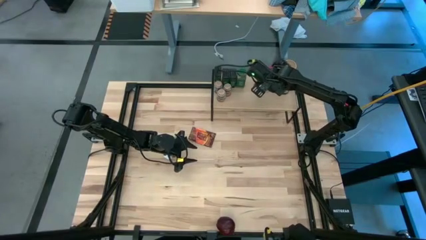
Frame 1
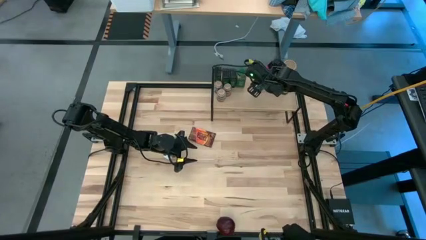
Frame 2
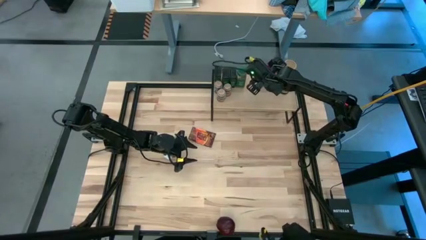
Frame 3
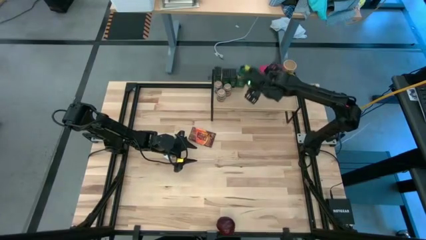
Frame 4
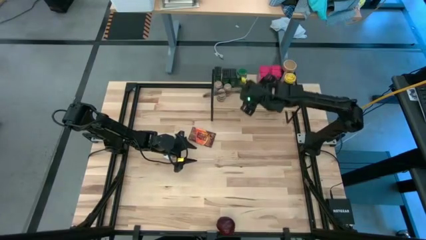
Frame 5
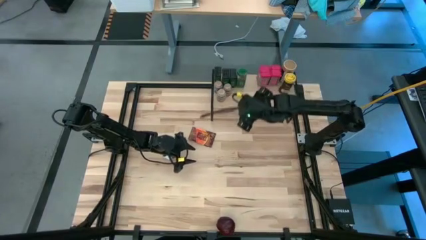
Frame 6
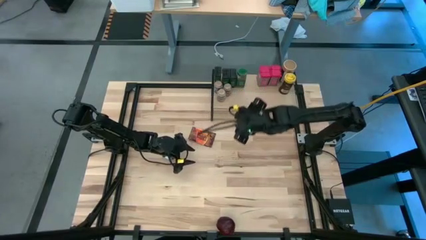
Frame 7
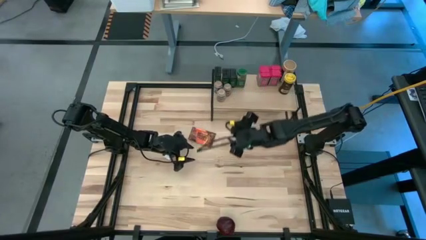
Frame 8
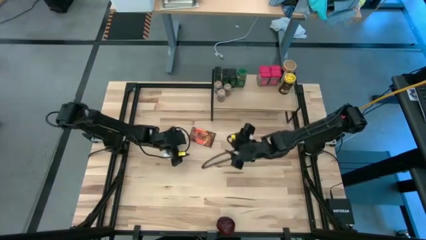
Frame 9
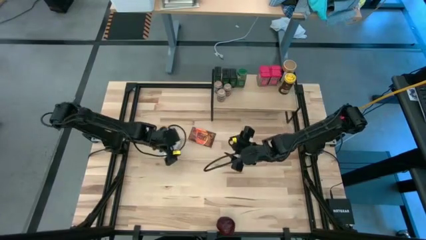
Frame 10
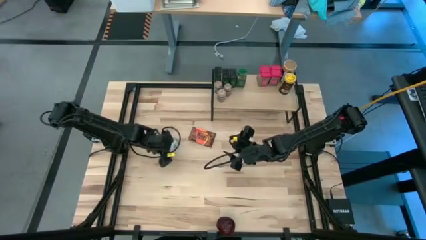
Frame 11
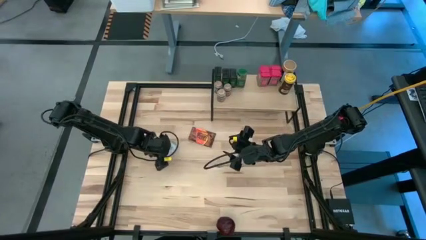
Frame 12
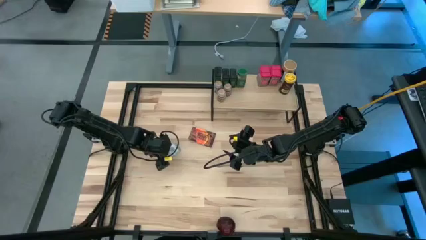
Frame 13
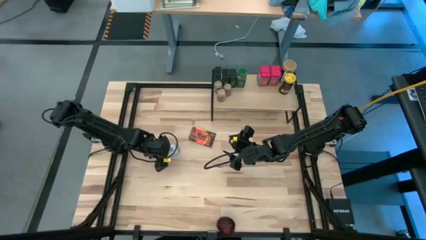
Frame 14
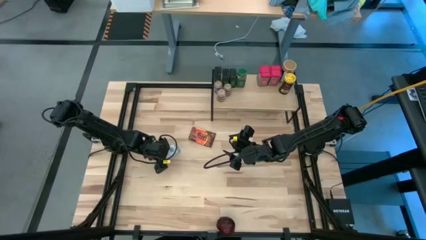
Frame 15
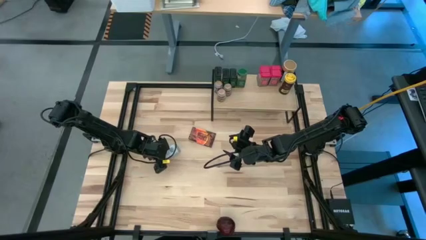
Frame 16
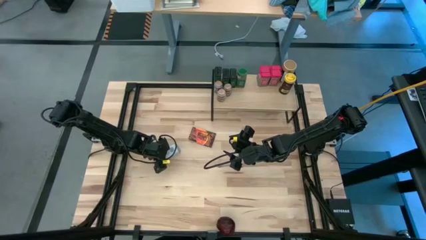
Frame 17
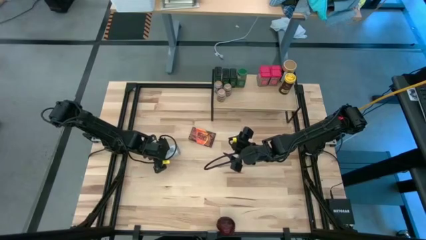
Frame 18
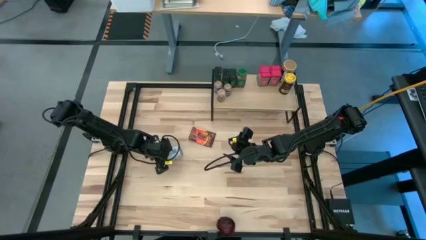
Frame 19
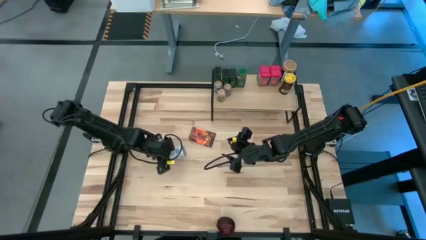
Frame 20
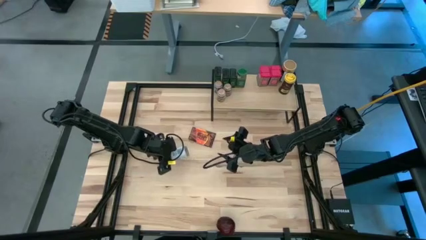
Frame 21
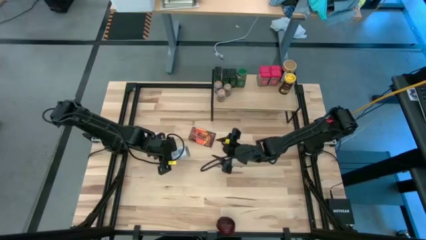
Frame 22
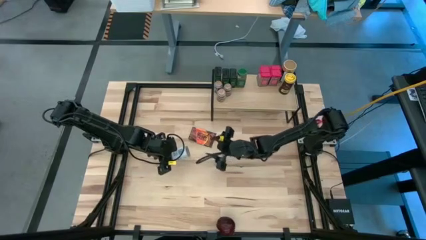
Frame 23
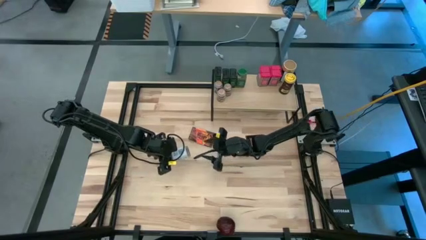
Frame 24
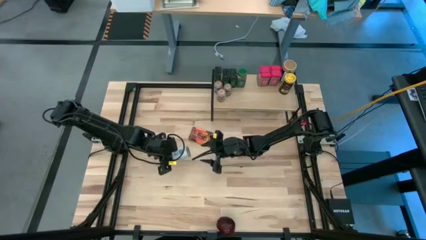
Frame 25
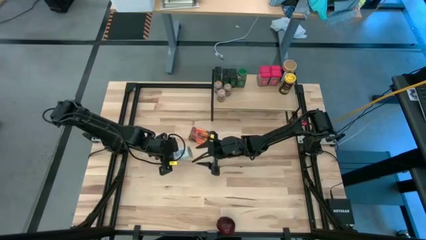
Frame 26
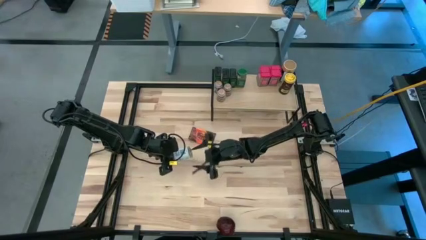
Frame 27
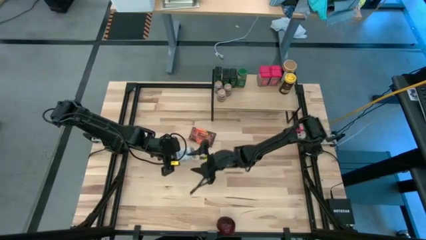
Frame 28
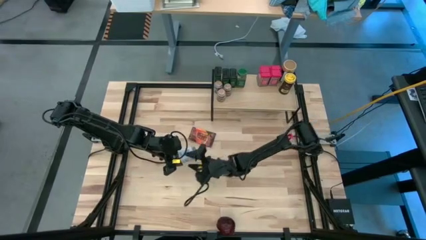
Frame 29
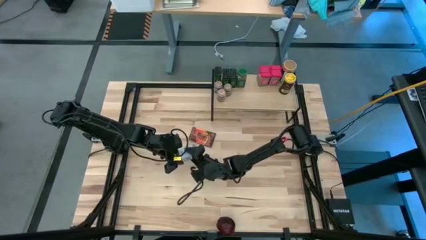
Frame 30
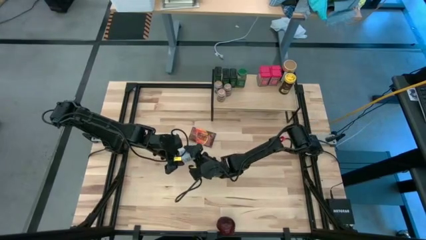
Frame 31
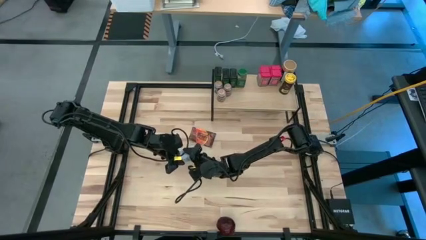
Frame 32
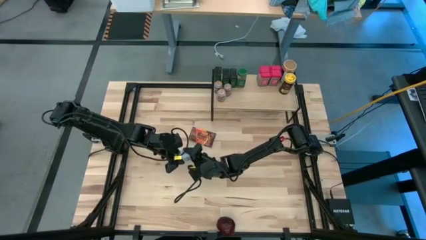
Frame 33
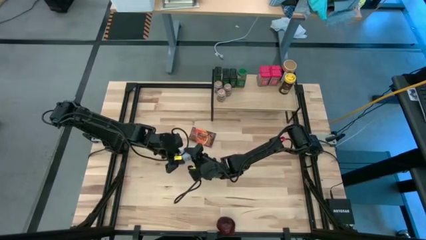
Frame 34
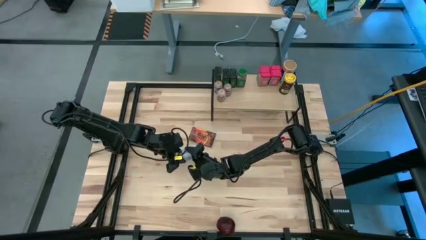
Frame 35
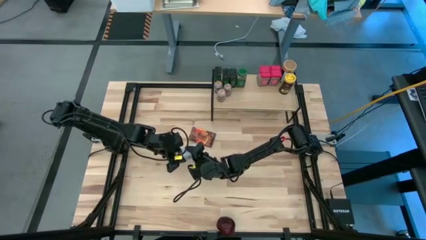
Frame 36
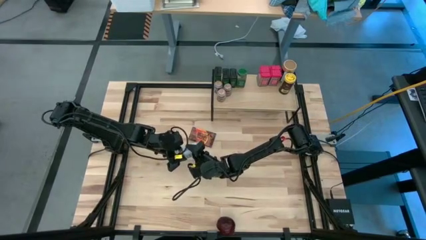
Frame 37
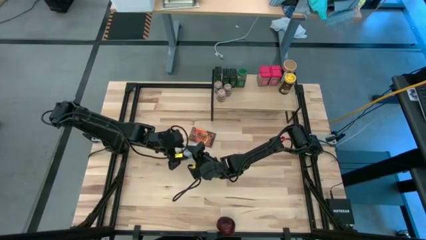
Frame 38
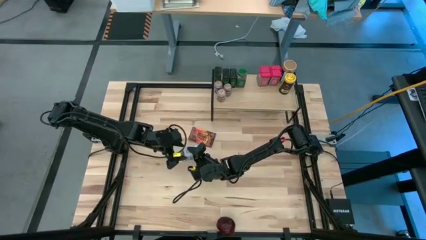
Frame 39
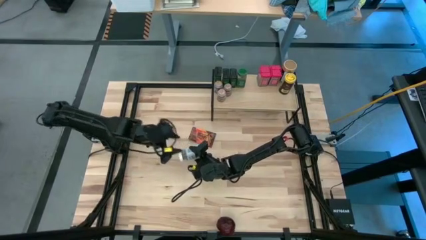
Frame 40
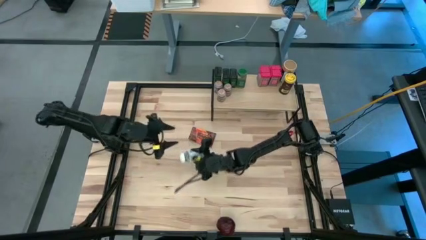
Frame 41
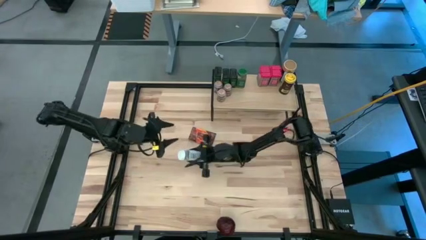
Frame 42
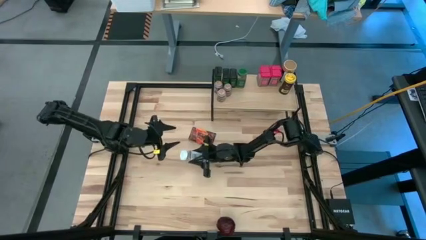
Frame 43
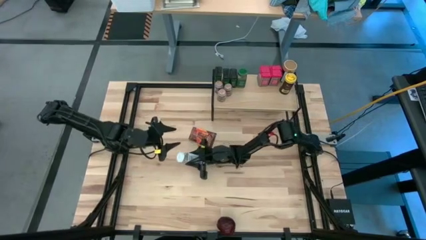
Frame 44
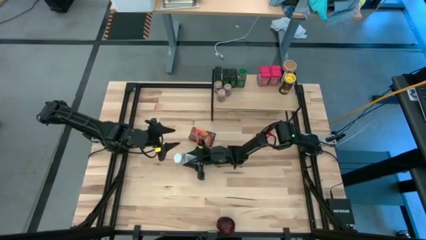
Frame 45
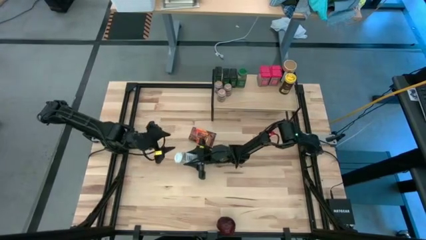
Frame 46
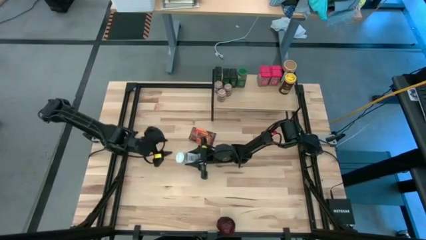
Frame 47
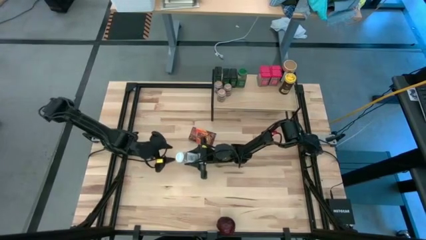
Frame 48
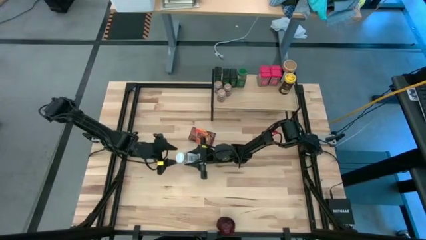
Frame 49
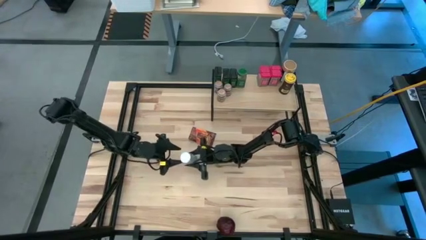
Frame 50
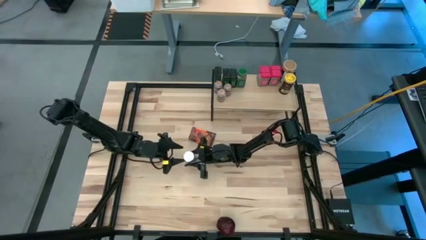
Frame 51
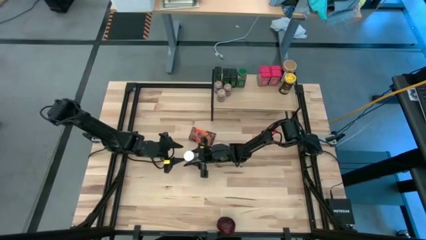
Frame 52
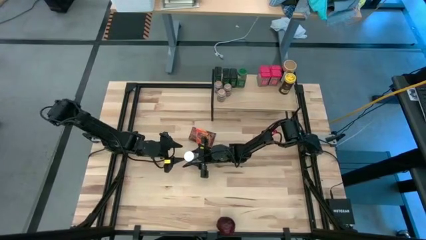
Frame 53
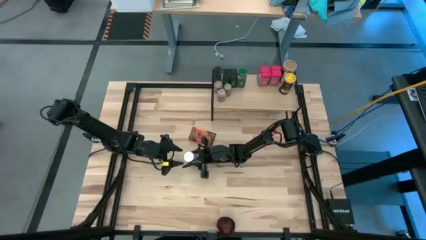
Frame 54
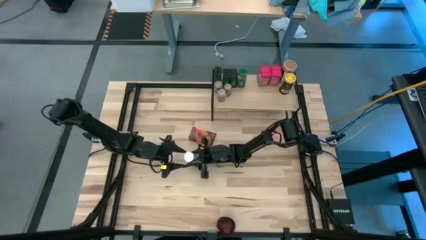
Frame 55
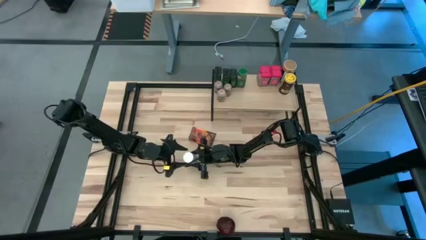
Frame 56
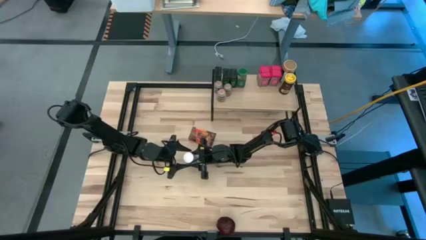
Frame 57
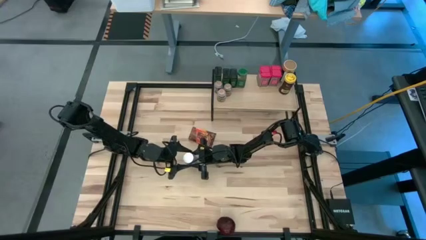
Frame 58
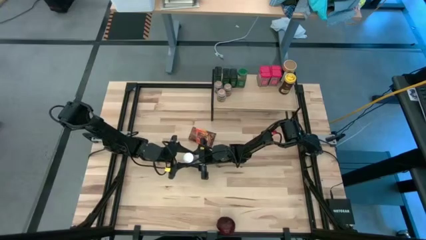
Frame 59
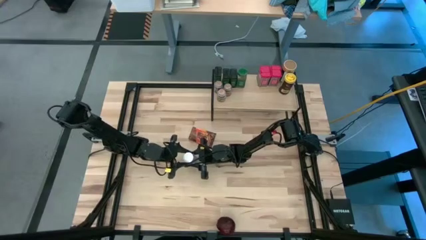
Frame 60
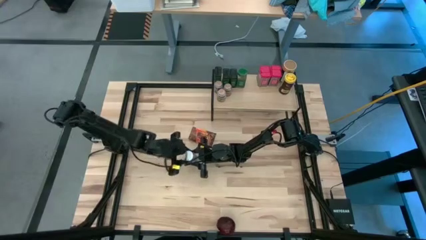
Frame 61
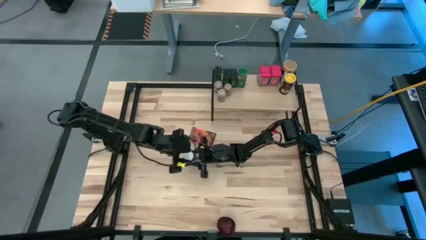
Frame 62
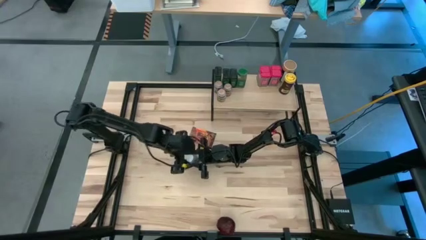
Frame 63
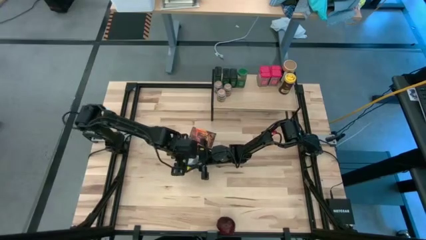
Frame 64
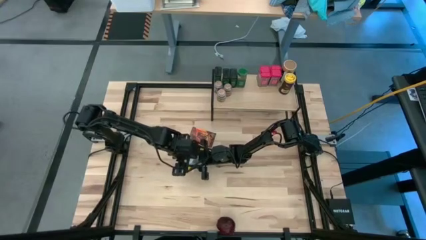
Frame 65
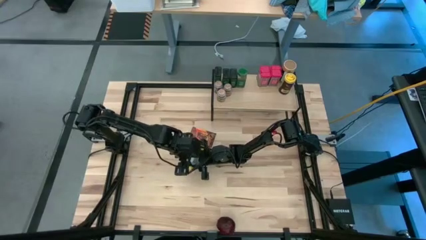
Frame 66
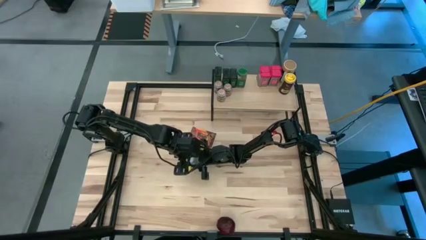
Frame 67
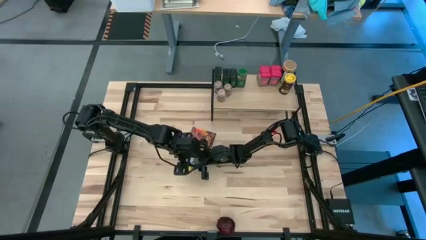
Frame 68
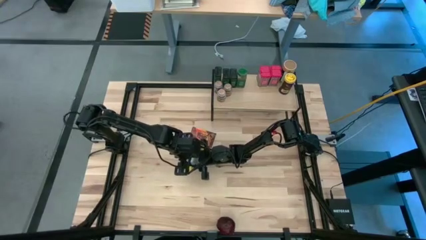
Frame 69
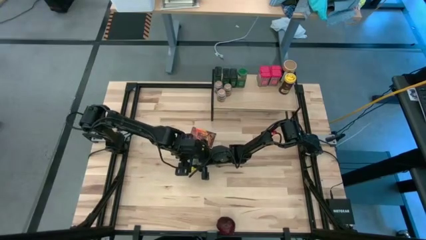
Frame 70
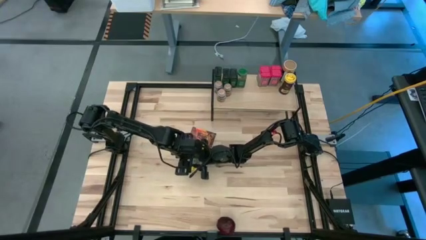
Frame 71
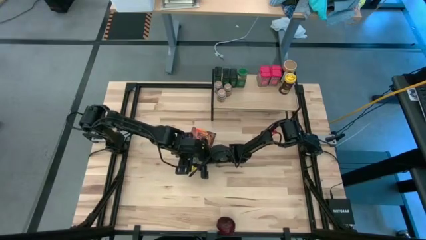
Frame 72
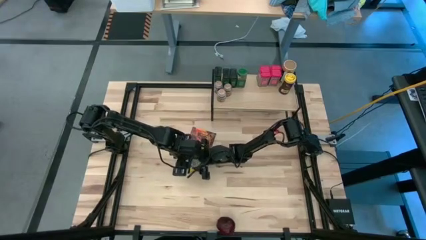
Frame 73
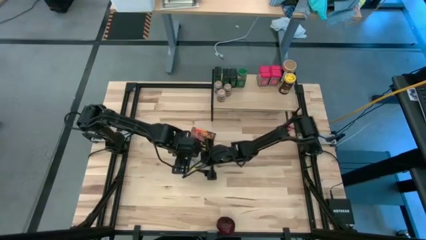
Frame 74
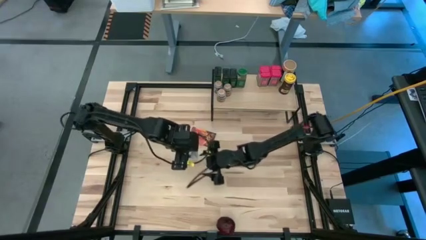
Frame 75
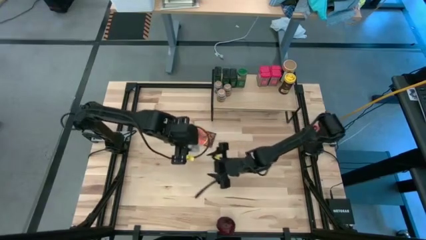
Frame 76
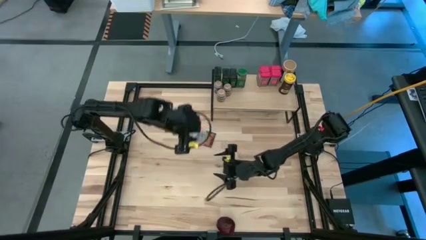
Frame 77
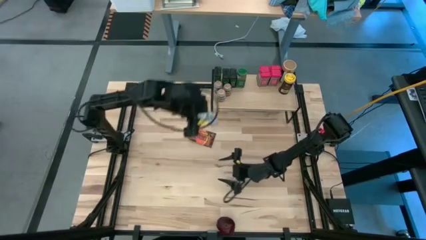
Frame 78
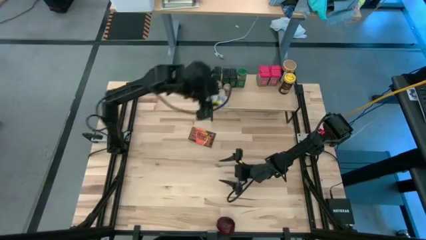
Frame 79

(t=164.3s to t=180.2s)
Task: Shelf spices
Put the white seasoning can on the shelf
